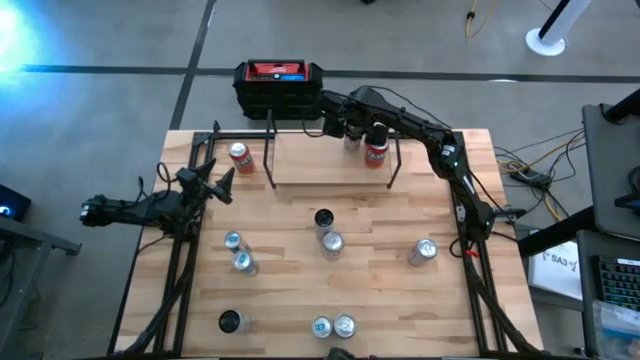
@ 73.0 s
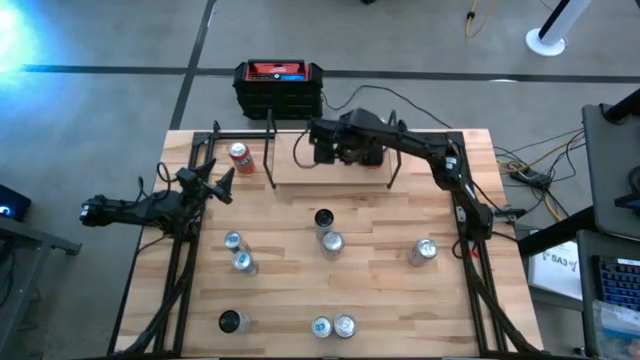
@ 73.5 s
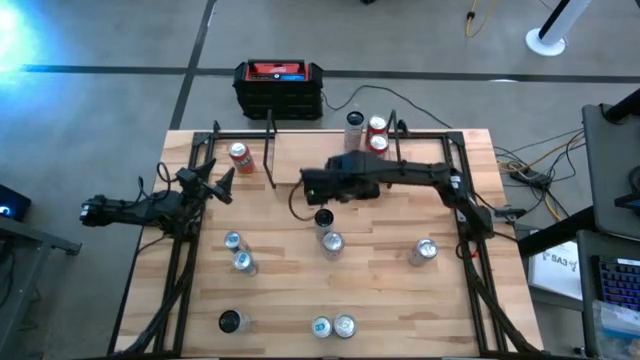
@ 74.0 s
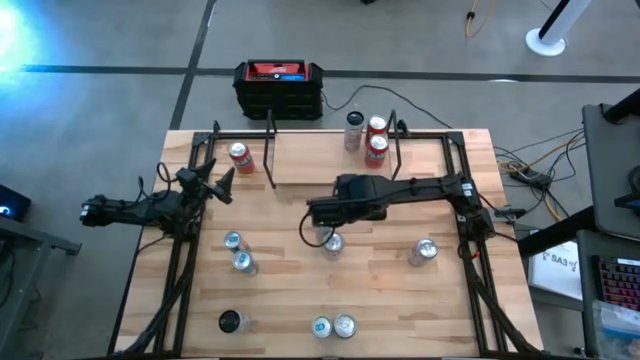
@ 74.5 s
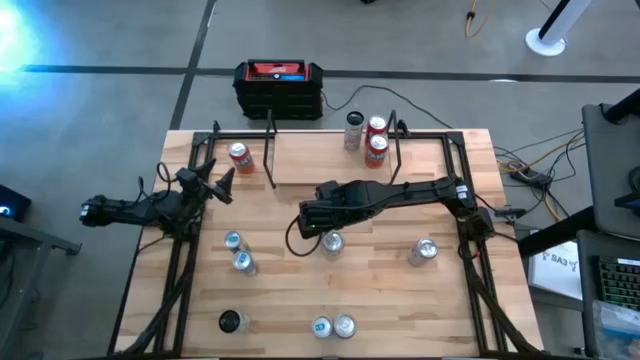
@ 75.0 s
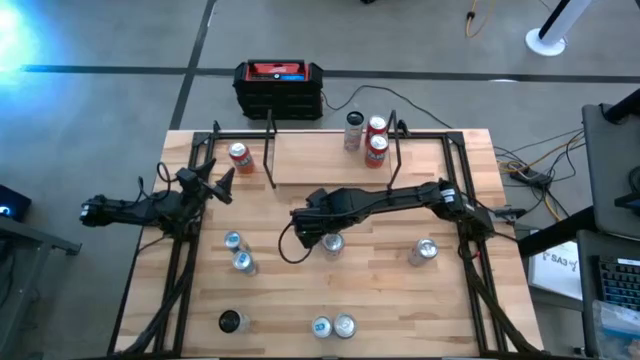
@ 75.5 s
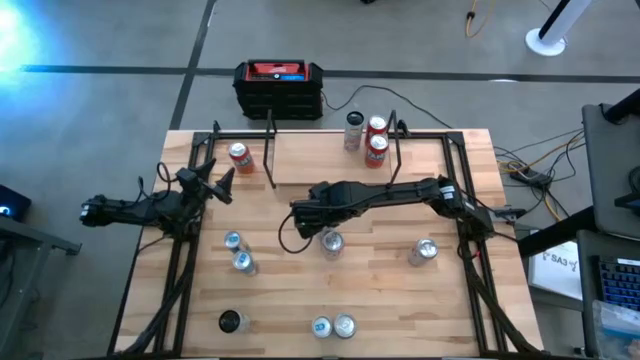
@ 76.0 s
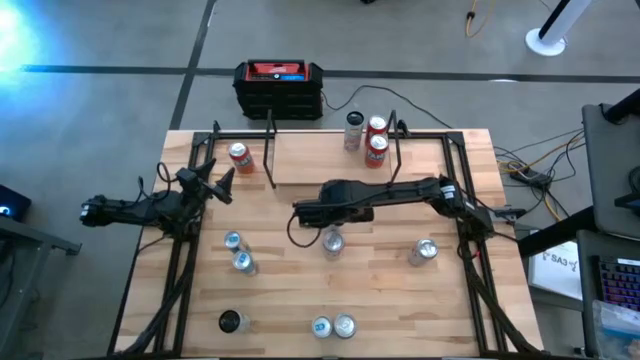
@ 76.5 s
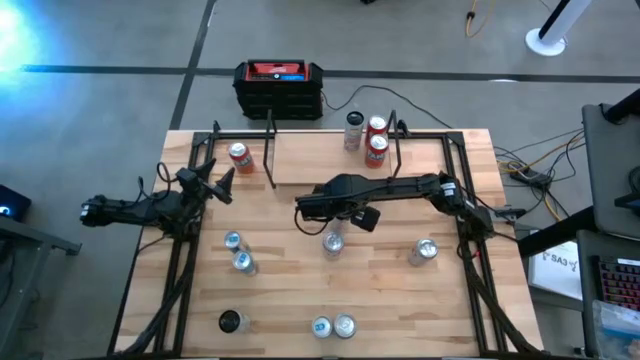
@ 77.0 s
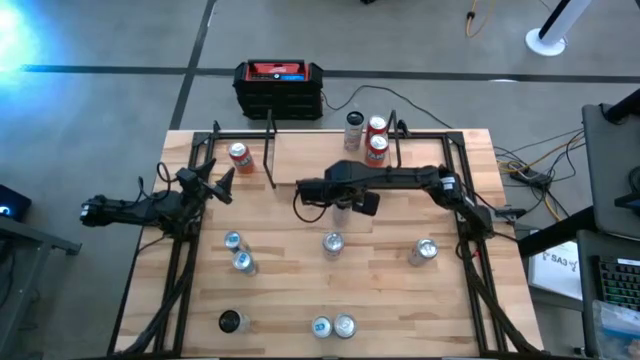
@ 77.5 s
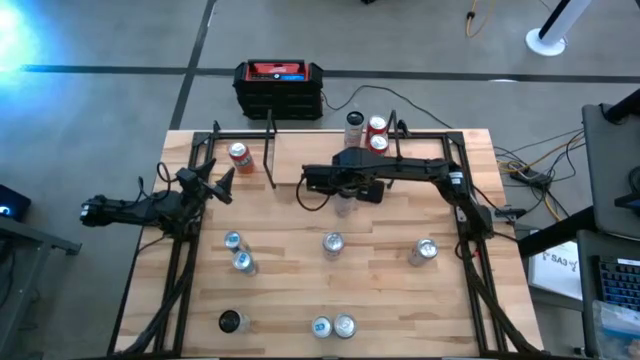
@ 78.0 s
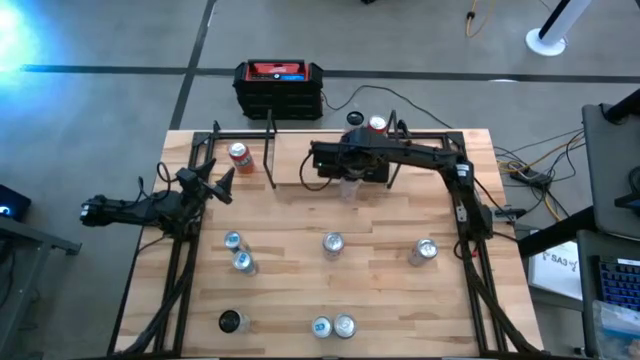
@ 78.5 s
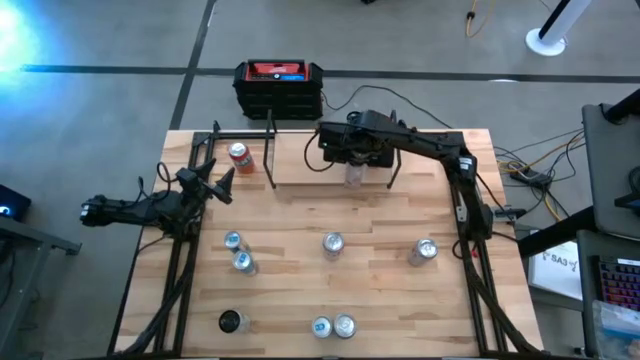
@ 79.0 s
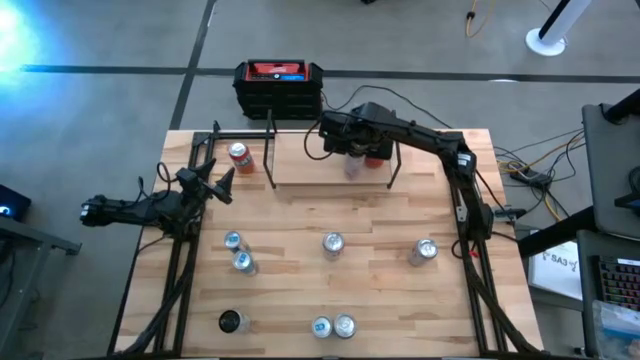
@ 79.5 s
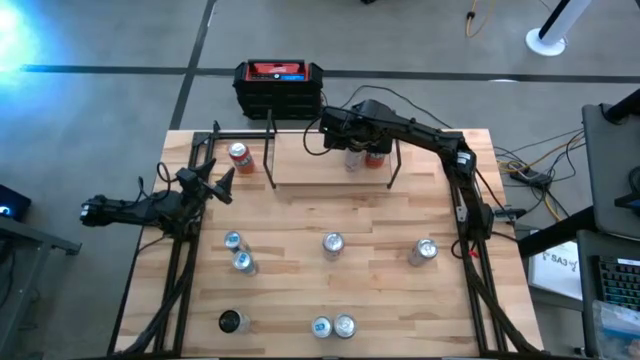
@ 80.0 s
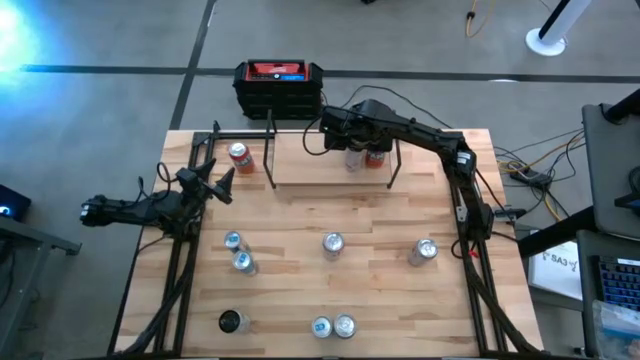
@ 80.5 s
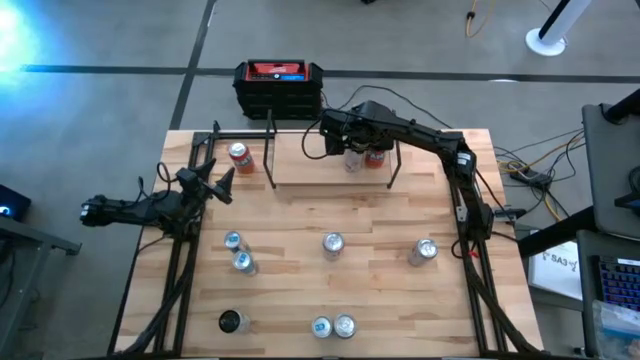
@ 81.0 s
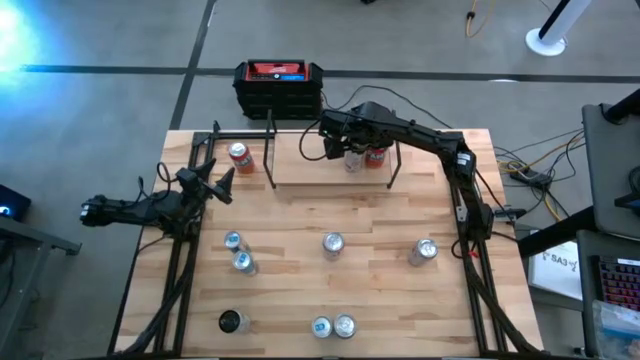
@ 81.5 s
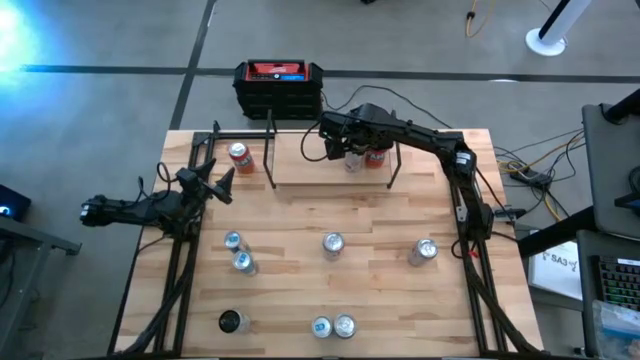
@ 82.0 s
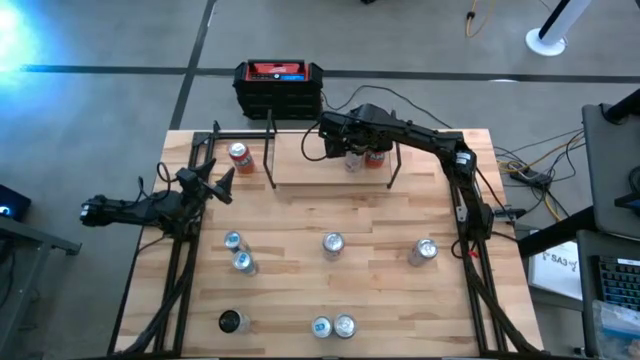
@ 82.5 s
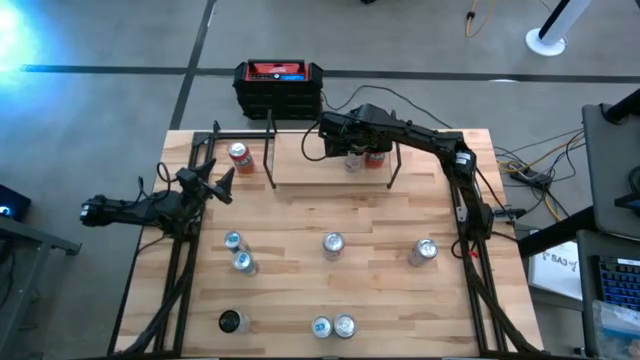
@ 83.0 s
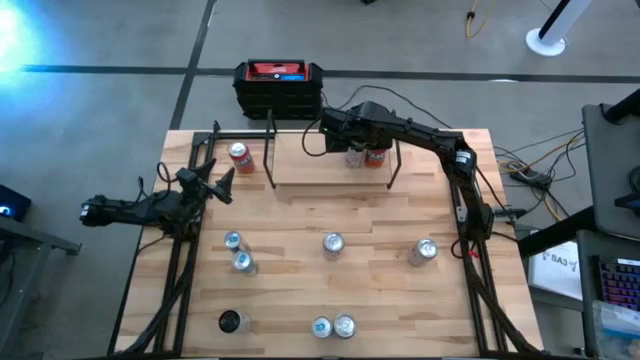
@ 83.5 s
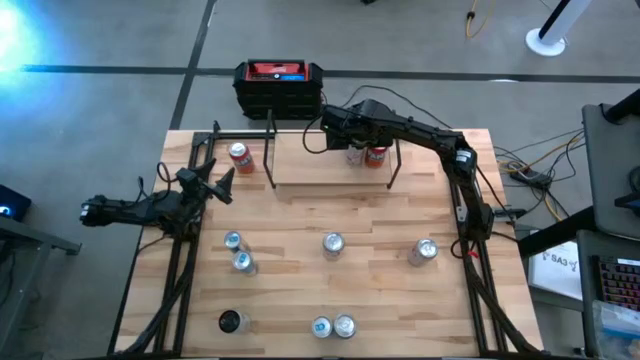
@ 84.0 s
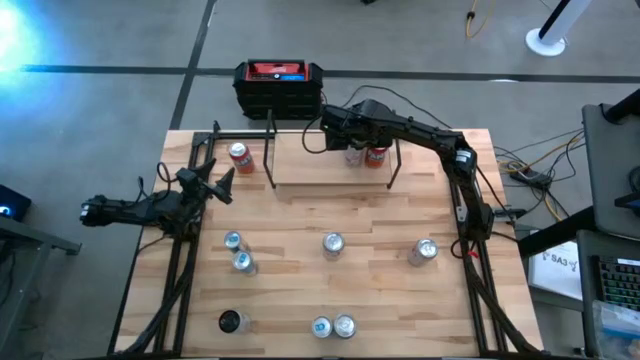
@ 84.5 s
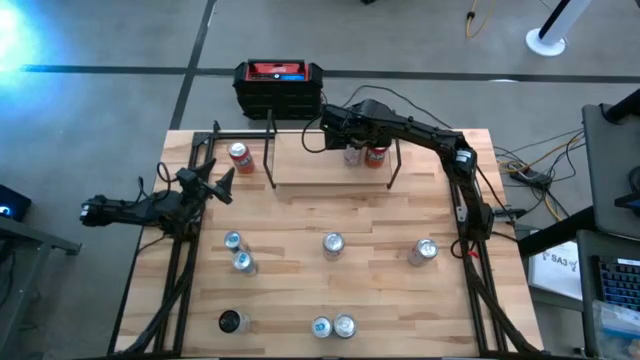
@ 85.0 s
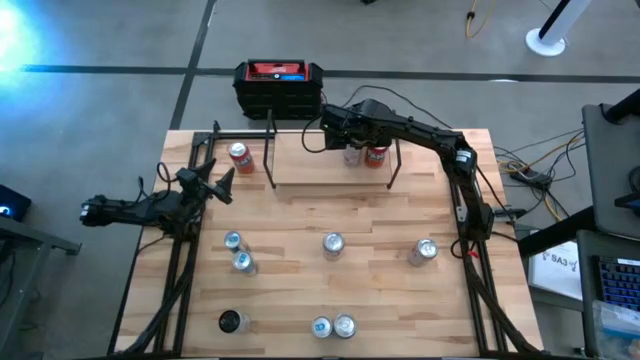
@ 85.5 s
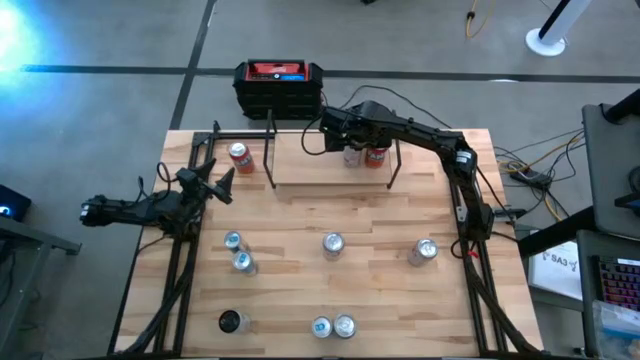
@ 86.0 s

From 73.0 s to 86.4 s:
Task: Place canned beverage on shelf
Put the top white pink soda can on the shelf aligned with the other white pink soda can

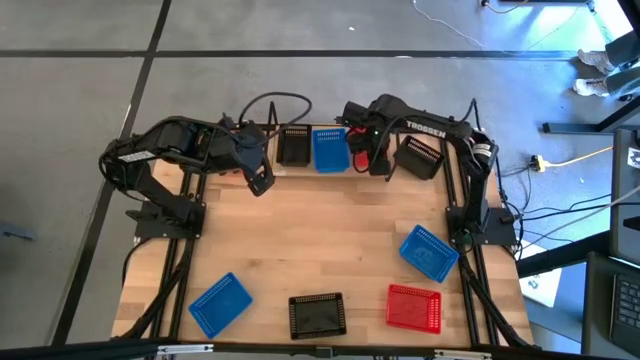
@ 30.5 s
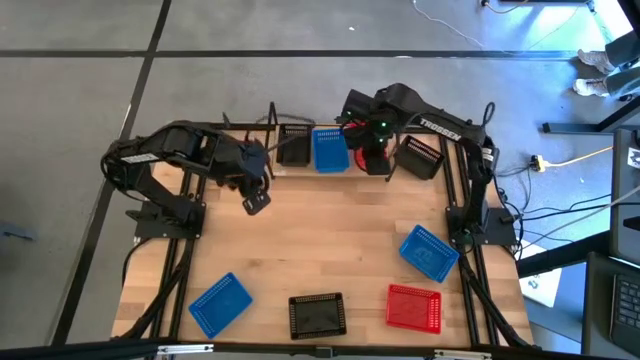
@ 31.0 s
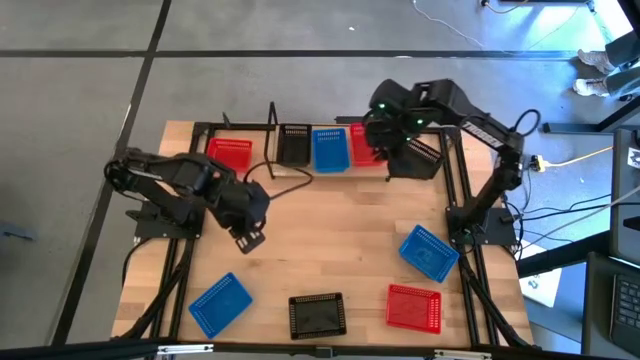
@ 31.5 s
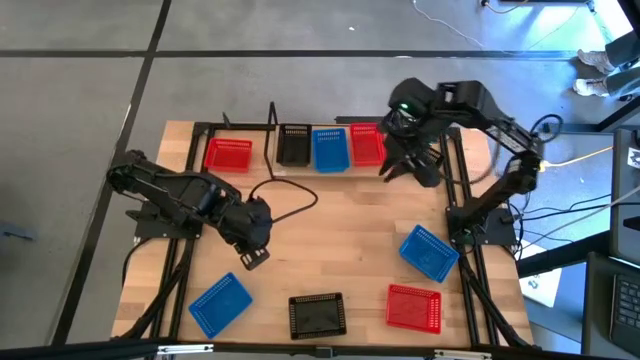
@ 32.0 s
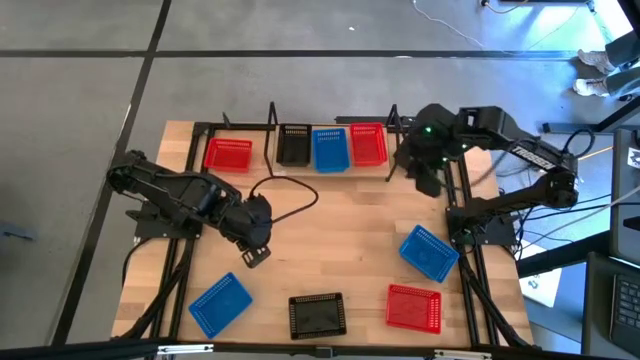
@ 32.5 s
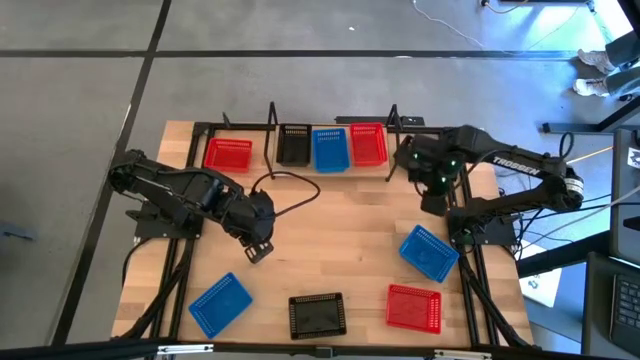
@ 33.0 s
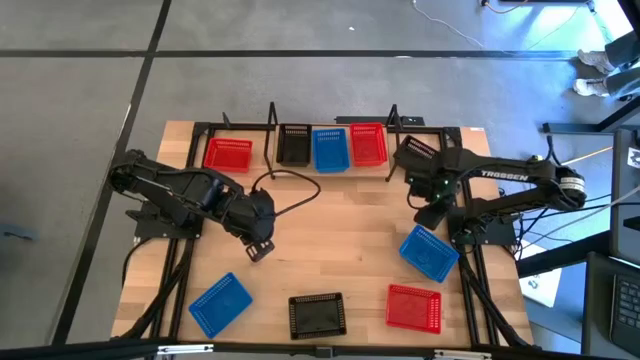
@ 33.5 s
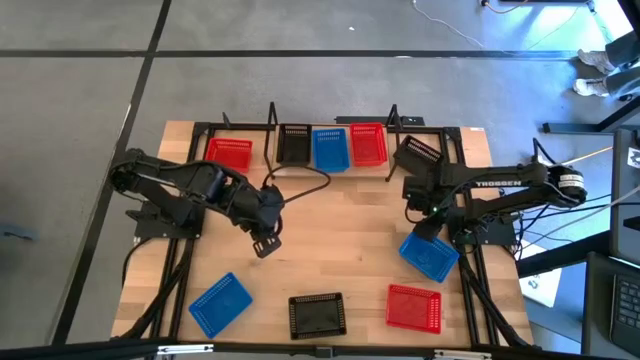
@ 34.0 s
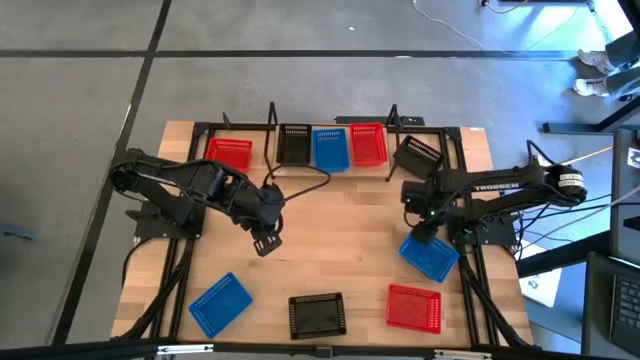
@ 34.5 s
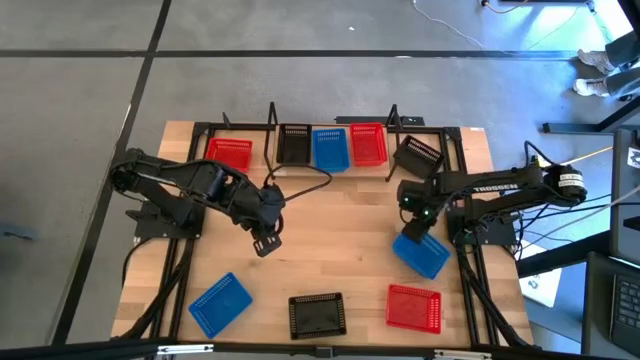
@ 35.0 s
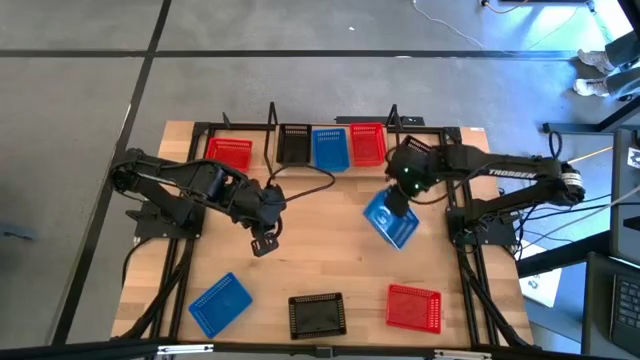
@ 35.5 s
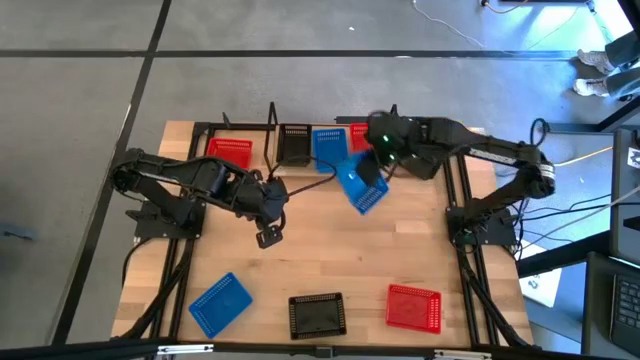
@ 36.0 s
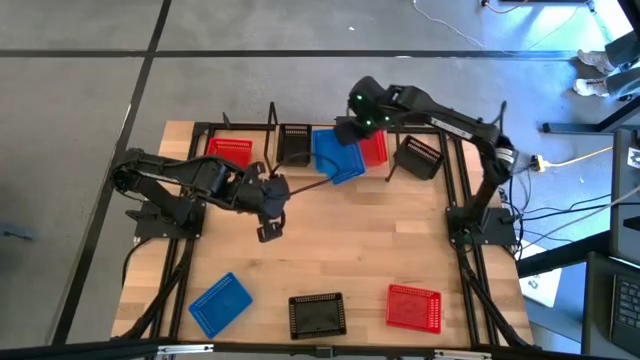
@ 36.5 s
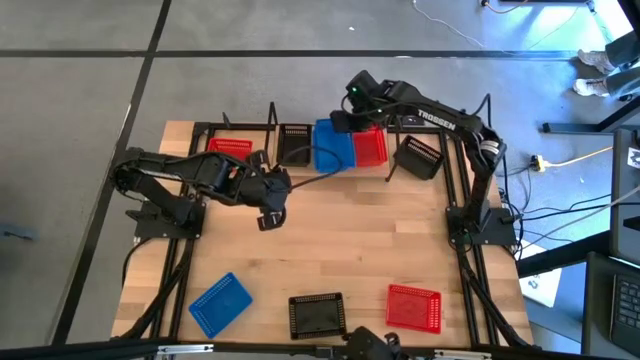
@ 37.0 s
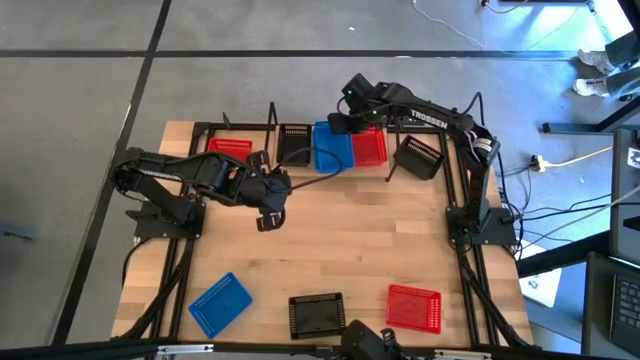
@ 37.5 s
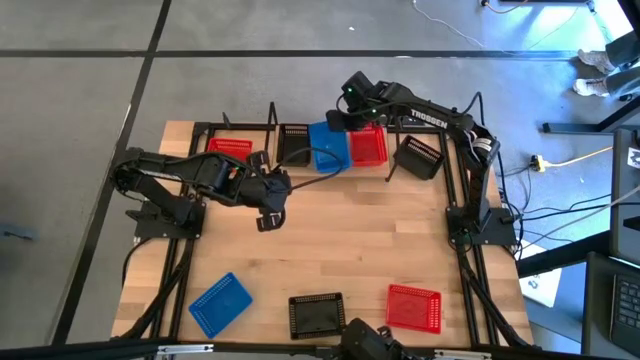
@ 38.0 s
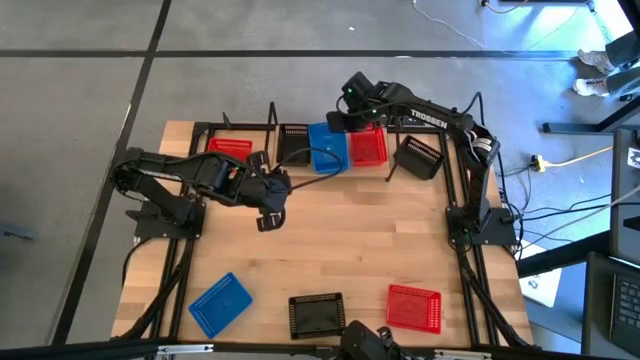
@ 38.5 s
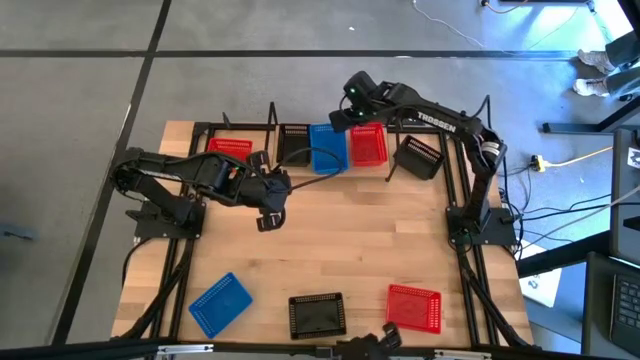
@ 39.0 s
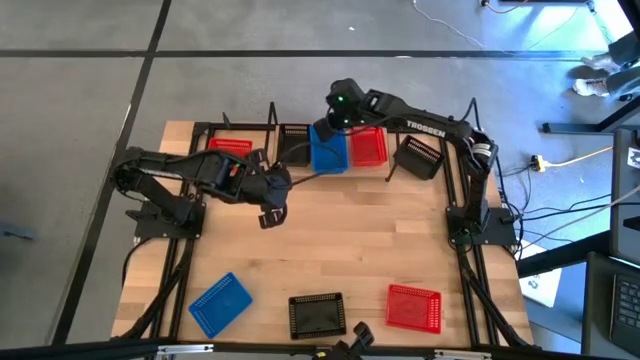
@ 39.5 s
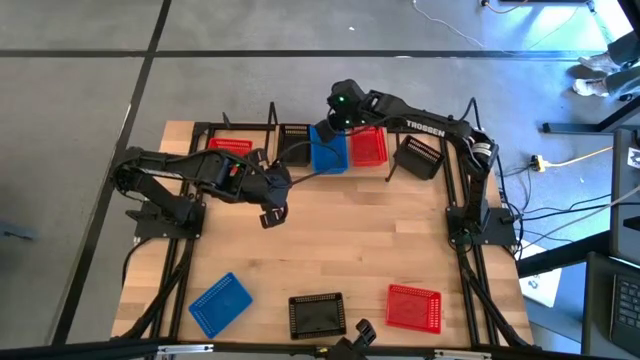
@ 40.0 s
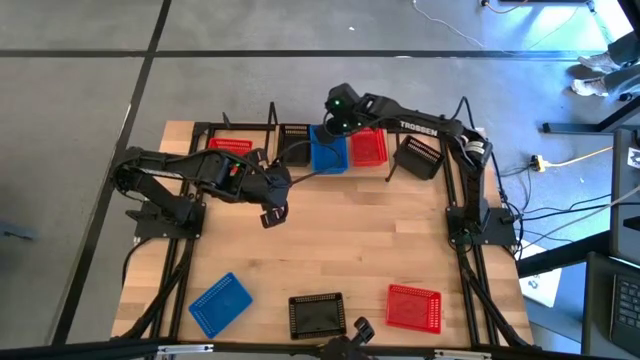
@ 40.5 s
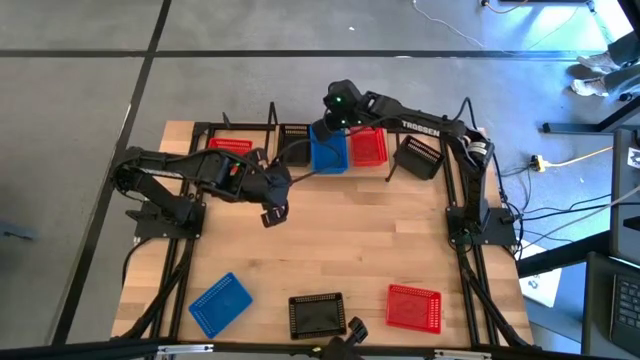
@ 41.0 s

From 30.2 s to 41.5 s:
Task: Stack baskets on shelf by color
Stack the right blue bin on top of the blue bin on the shelf
